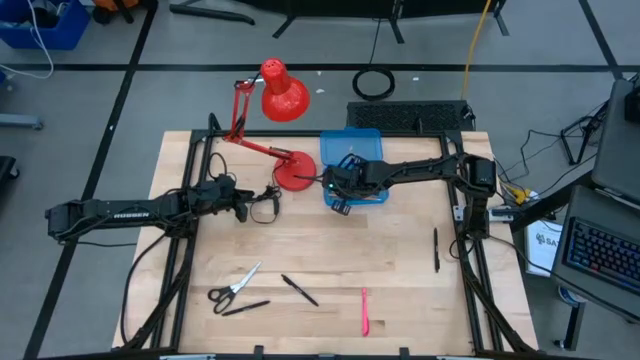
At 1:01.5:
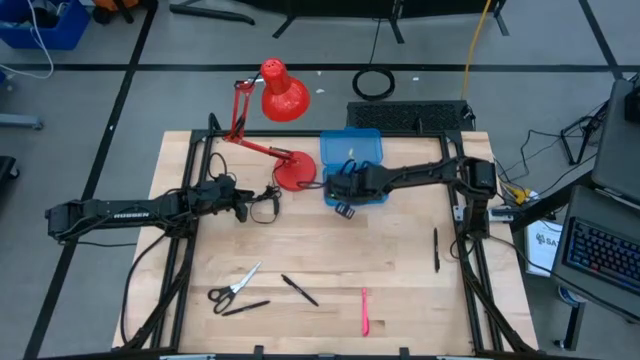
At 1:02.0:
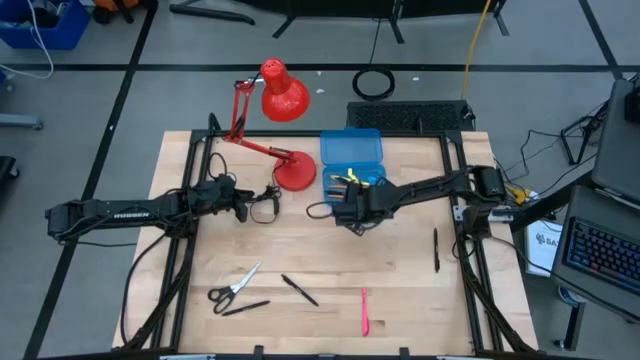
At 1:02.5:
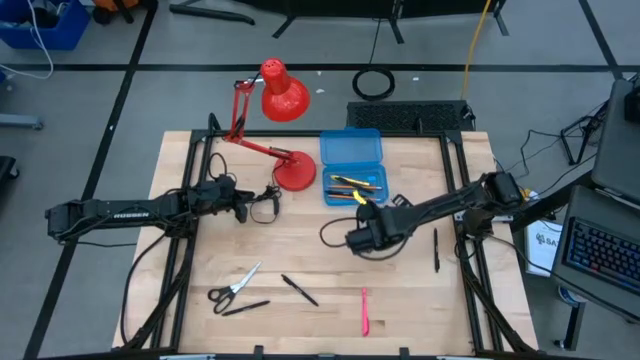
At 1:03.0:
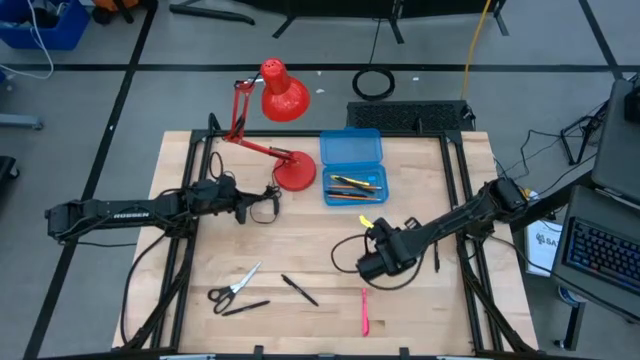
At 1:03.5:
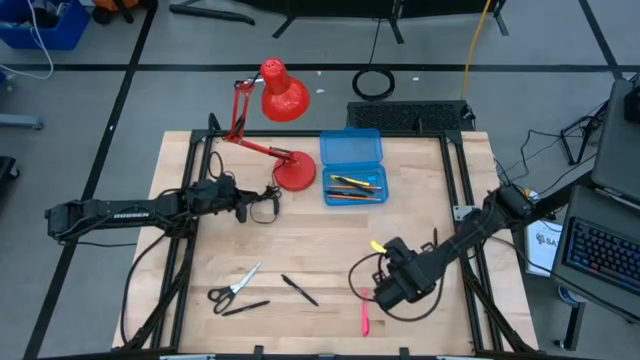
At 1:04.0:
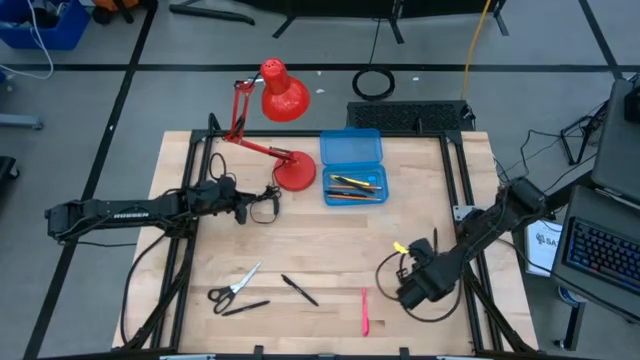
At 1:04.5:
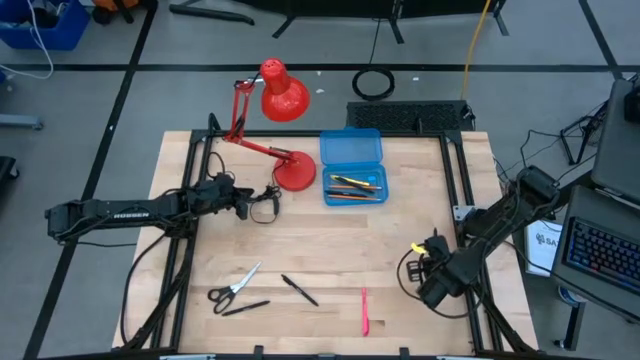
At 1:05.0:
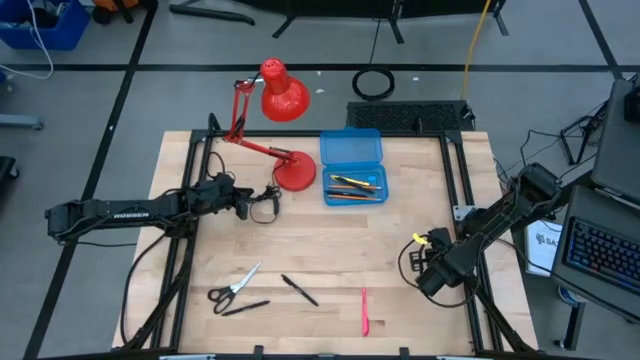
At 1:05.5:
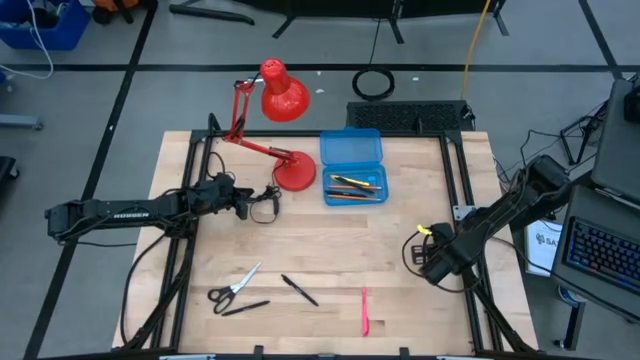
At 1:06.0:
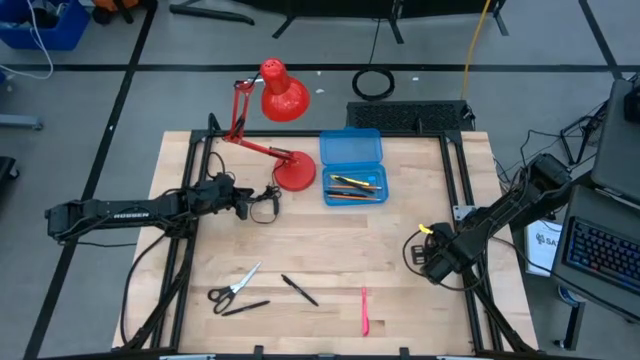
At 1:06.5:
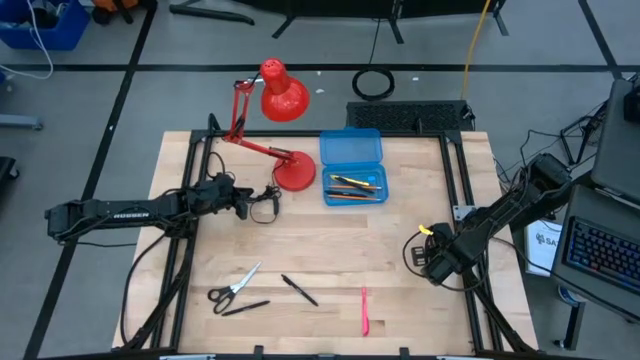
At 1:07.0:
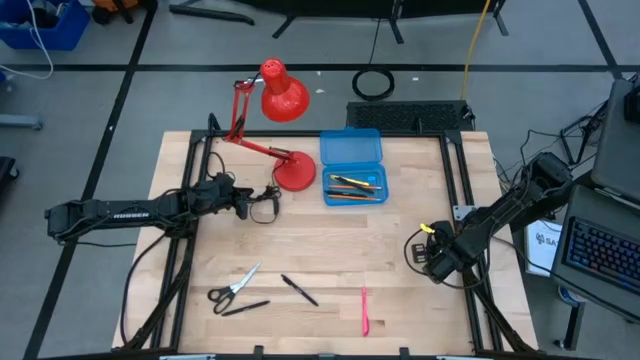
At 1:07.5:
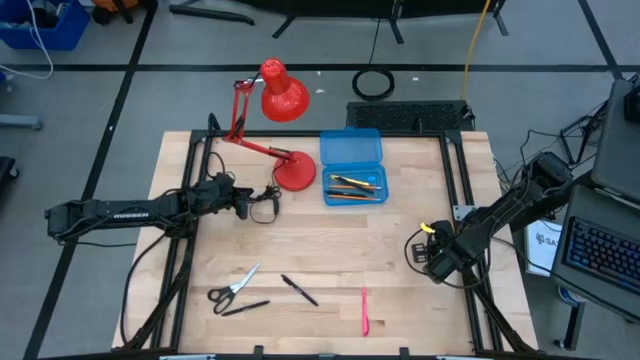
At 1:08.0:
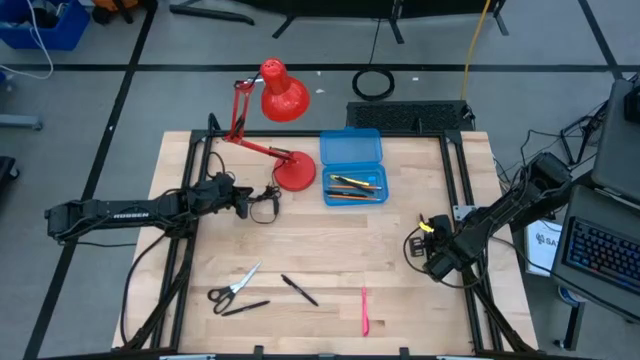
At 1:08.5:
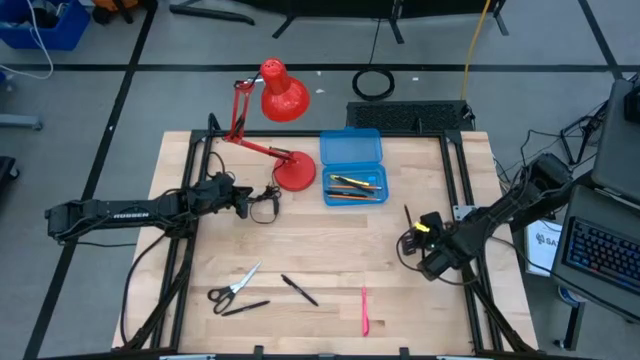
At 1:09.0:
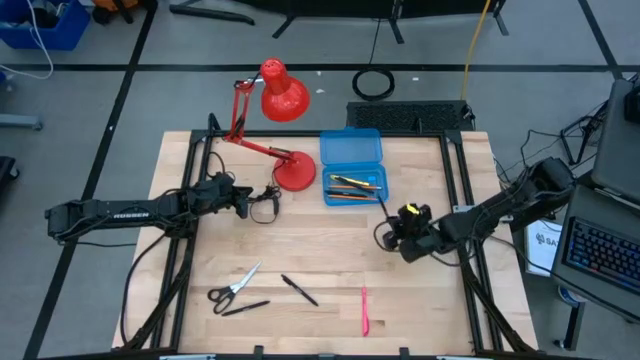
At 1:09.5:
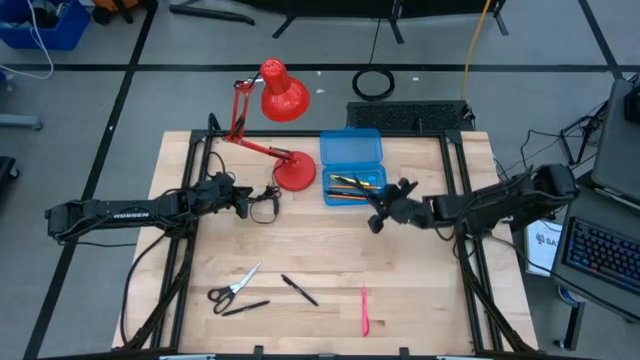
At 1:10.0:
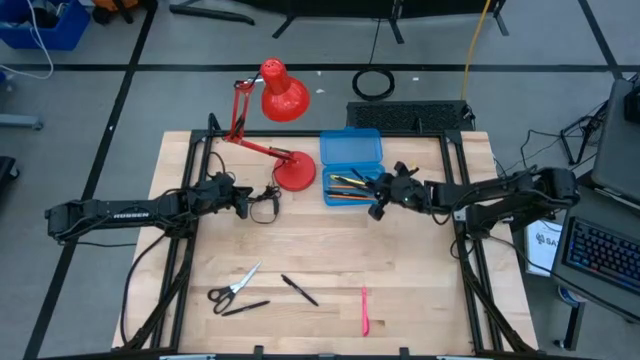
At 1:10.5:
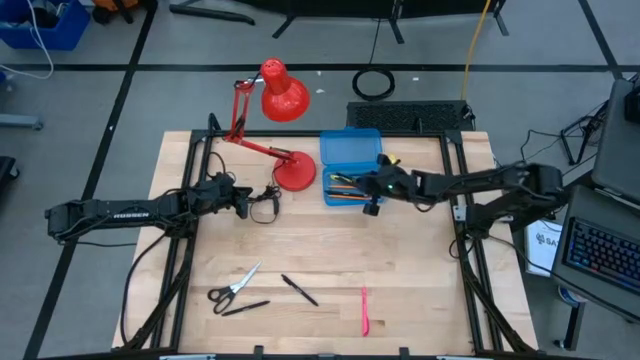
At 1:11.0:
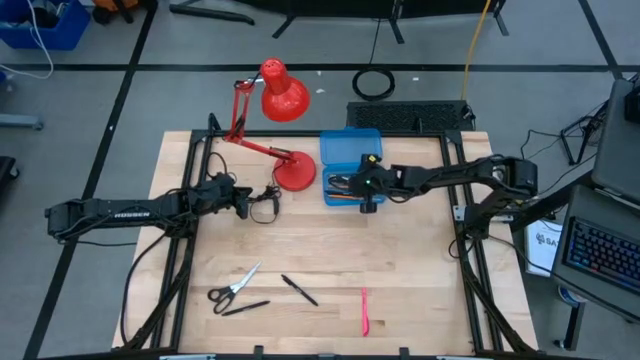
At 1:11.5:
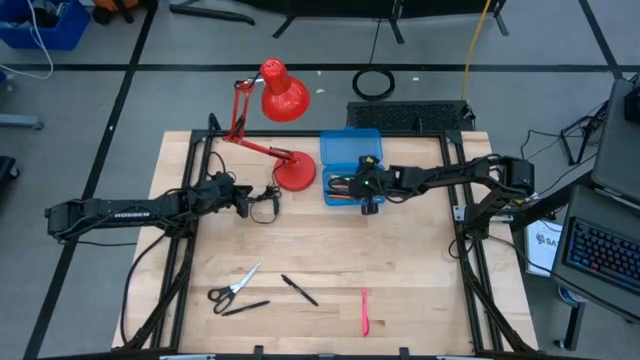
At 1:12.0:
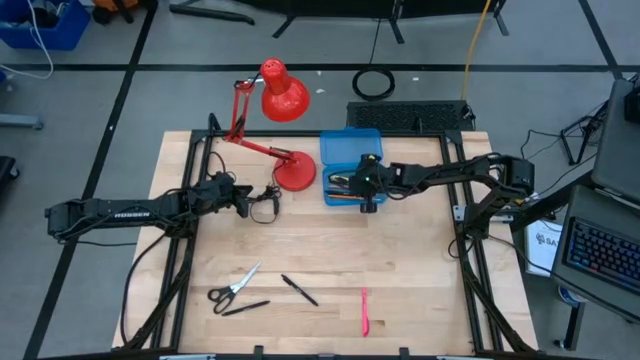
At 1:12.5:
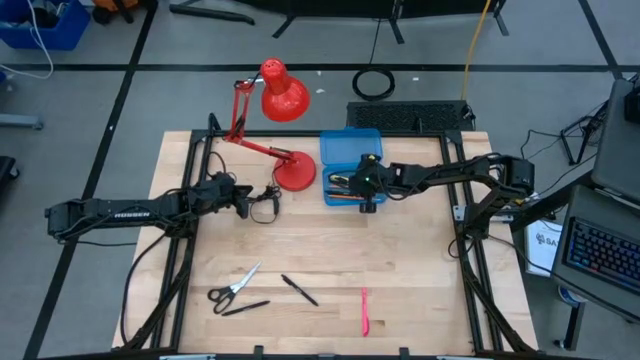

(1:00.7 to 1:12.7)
Task: Pick & place school supplies into a supply box
Put the black pen into the blue supply box

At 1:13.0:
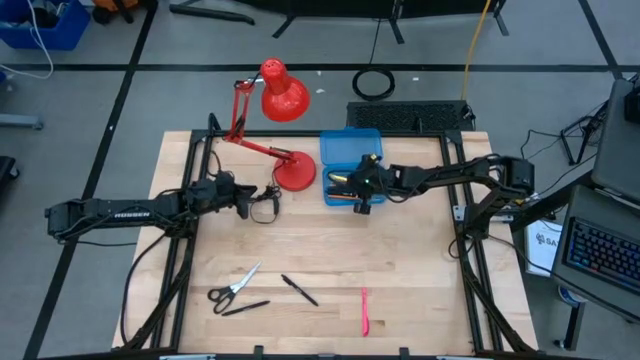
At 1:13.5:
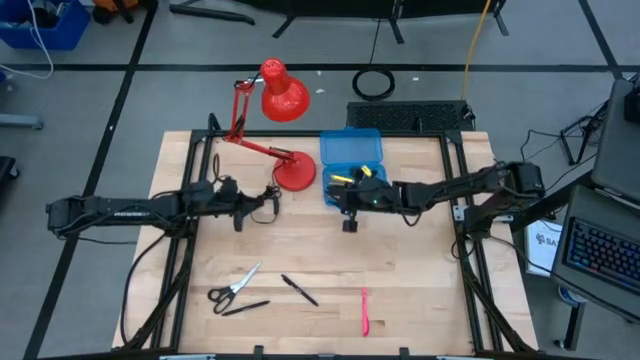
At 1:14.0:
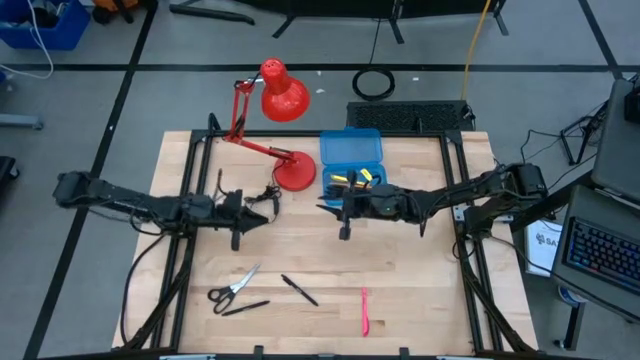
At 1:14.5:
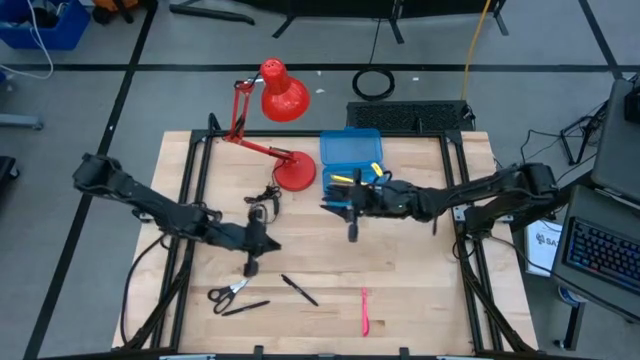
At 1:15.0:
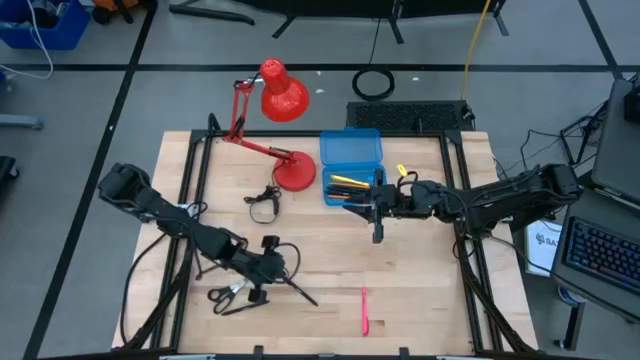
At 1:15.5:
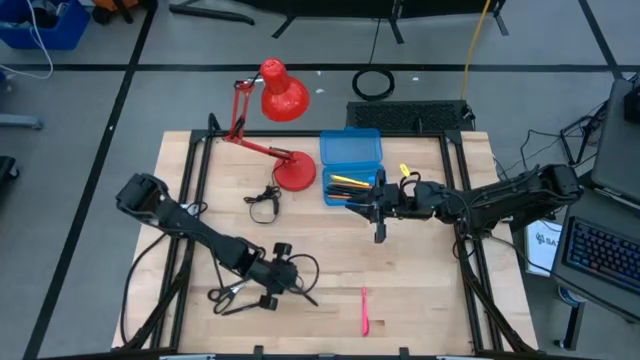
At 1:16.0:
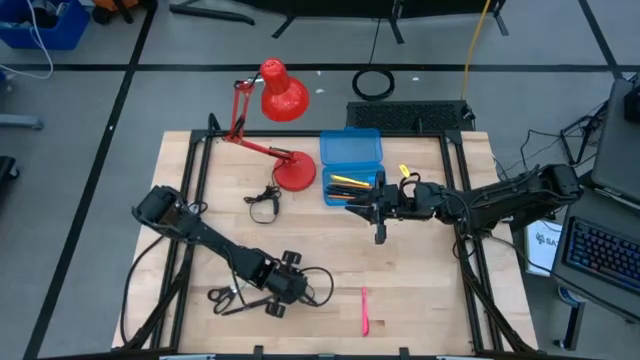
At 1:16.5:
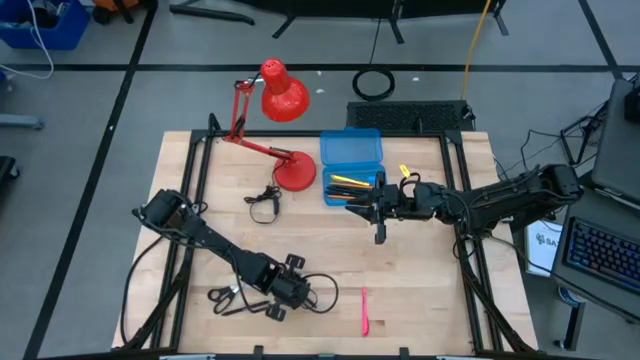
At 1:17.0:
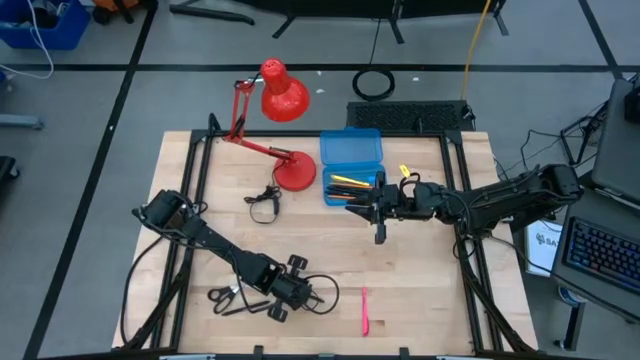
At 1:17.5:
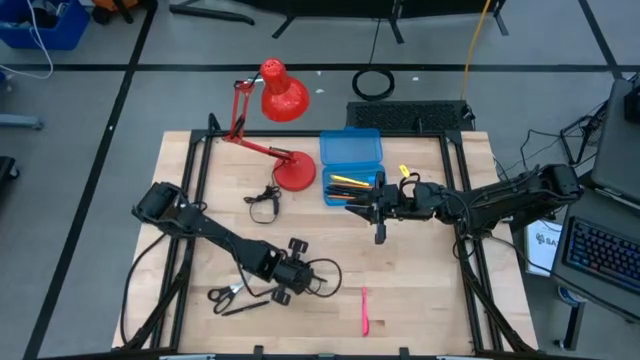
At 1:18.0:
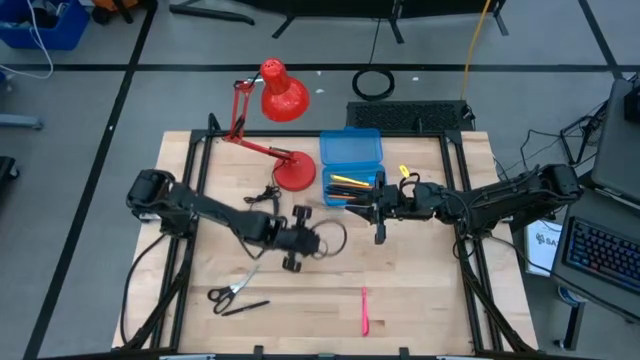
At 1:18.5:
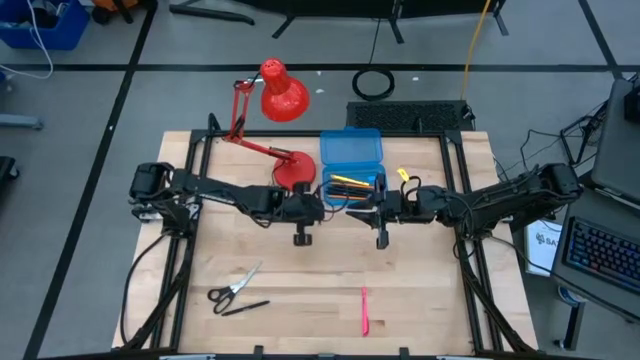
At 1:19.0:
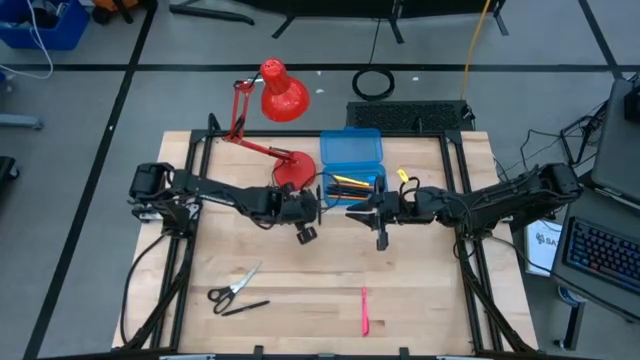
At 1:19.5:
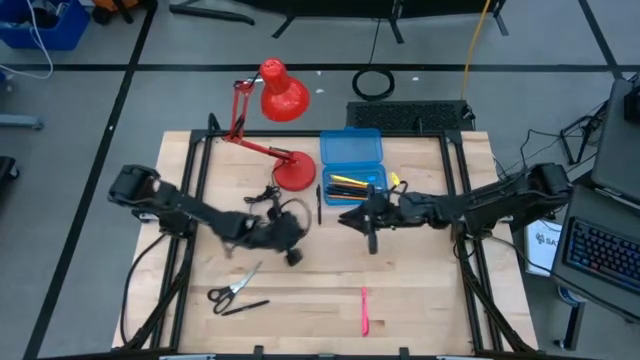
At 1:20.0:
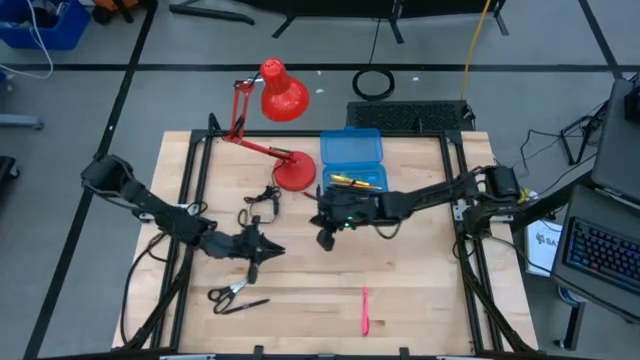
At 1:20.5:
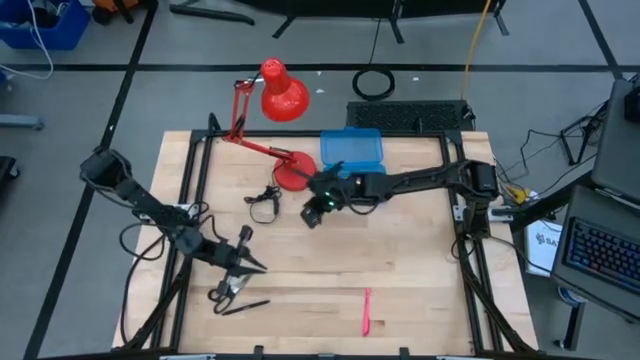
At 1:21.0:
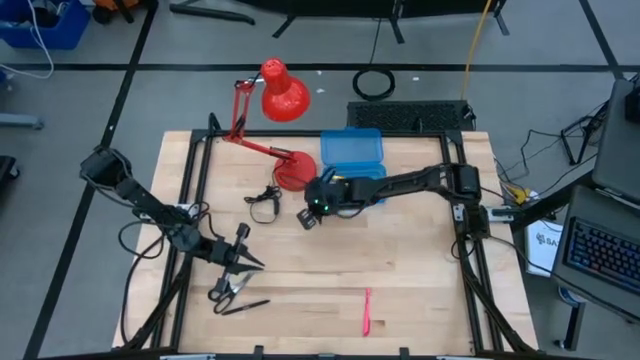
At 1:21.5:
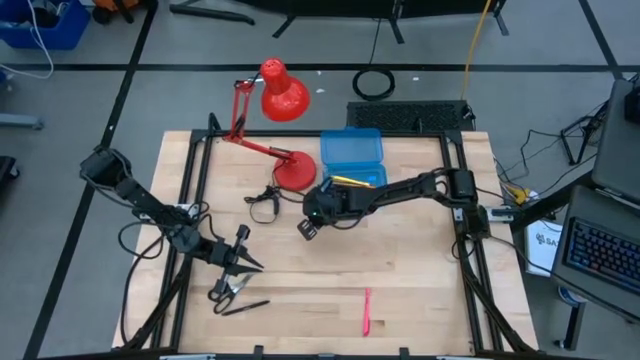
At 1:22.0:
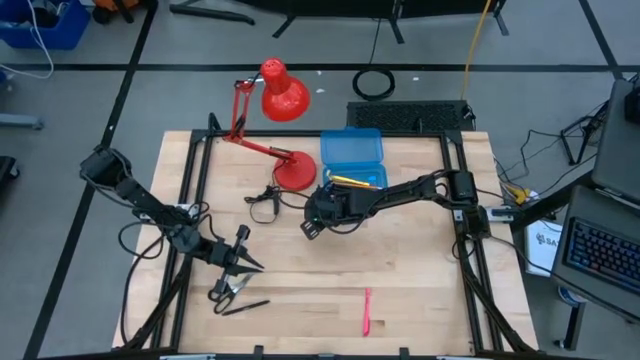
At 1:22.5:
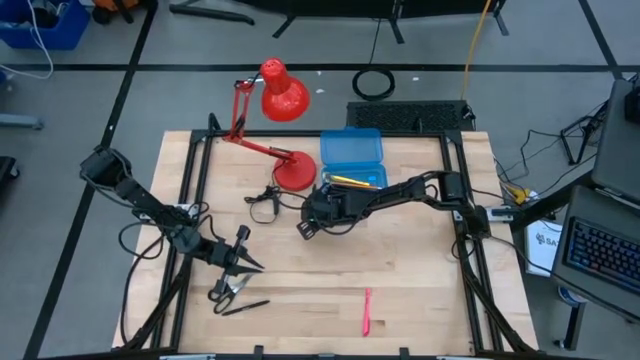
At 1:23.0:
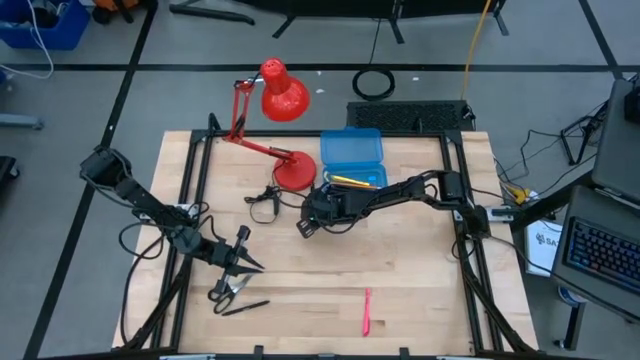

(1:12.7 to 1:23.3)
Put the black pen into the blue supply box
